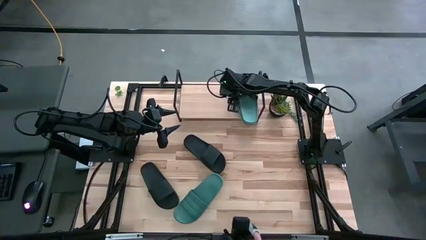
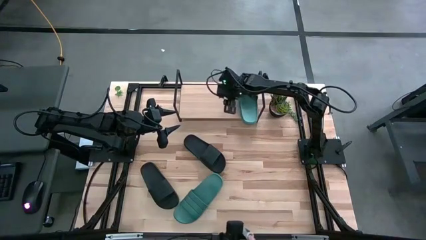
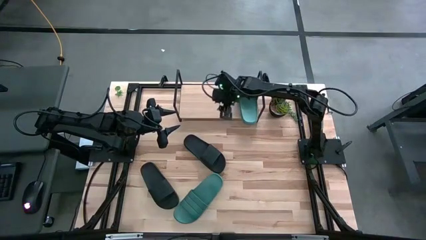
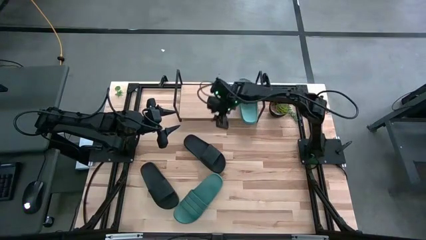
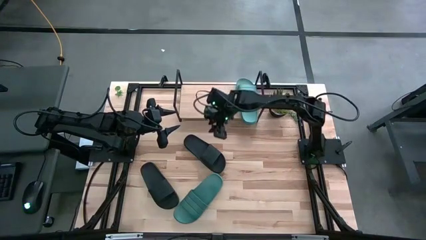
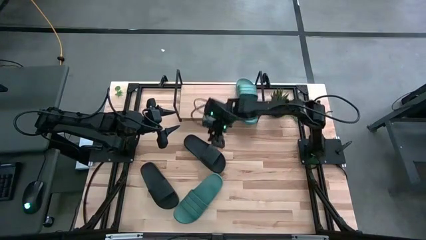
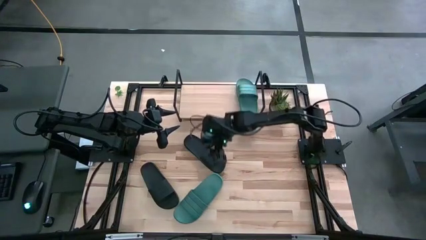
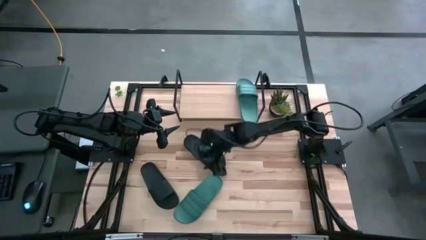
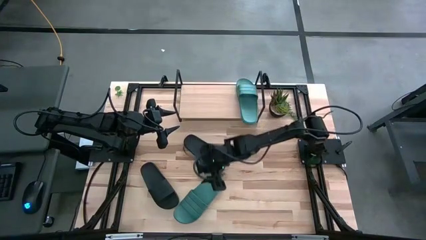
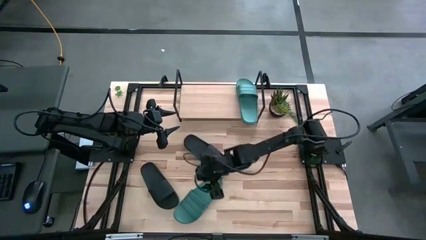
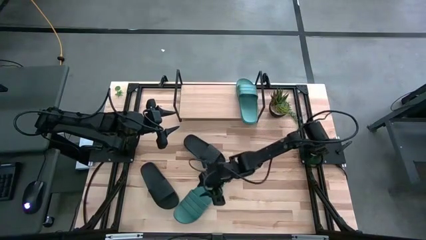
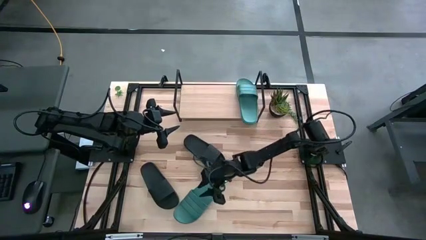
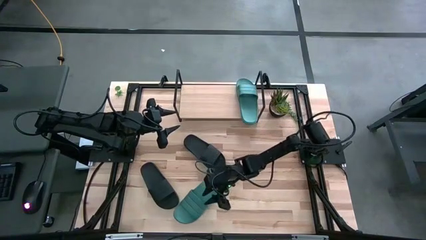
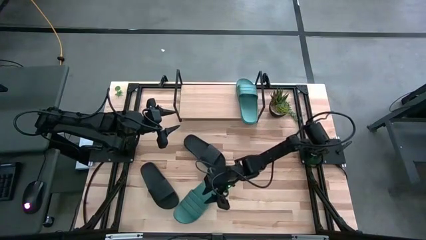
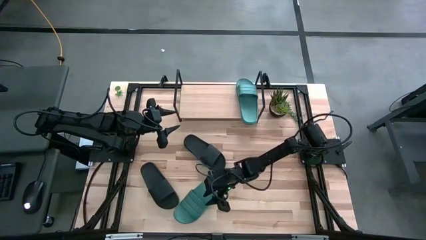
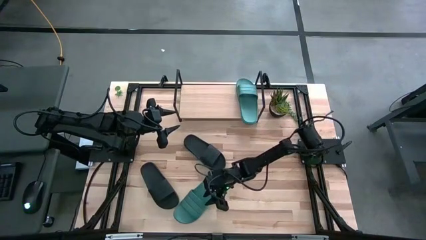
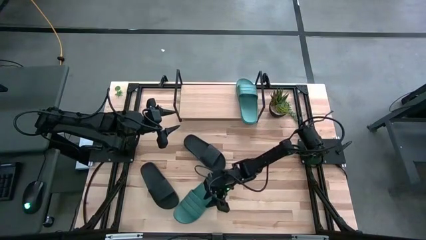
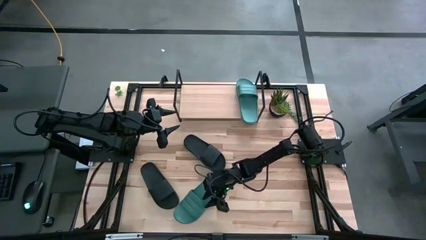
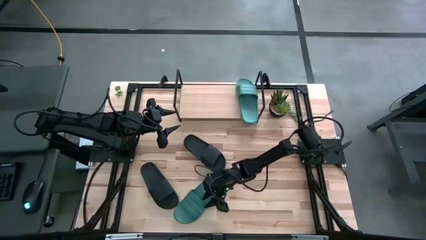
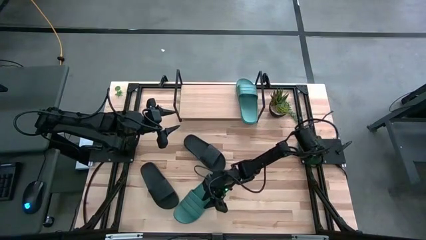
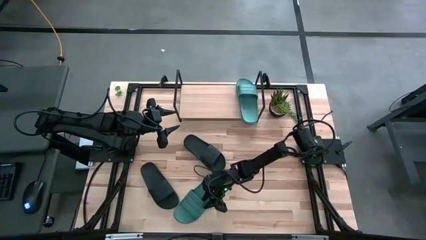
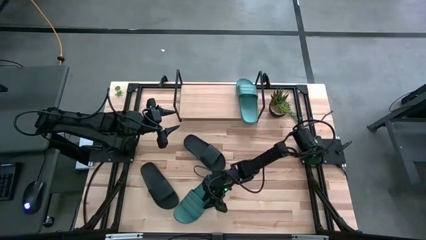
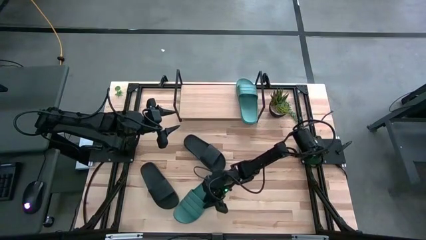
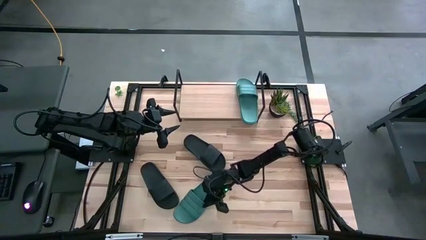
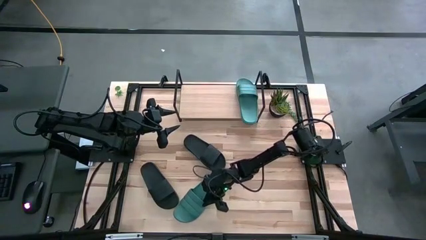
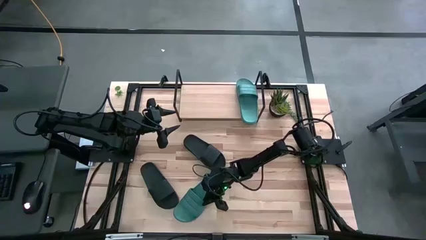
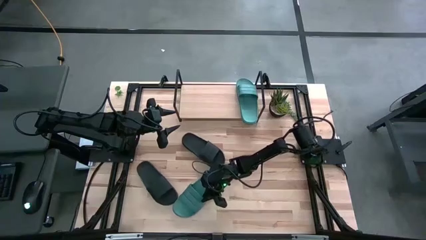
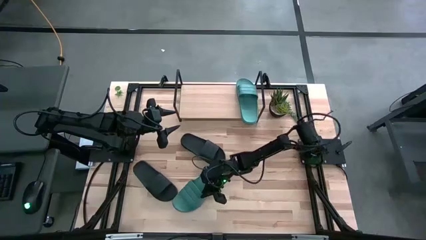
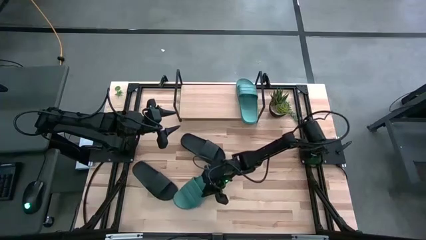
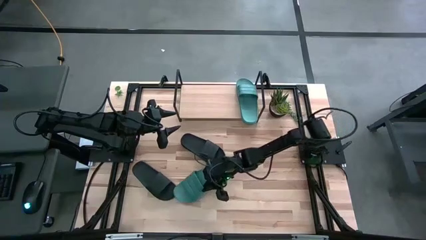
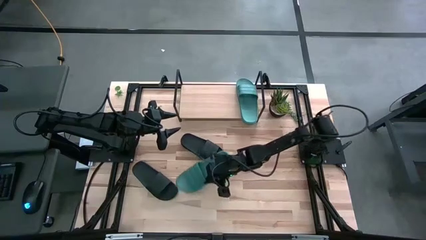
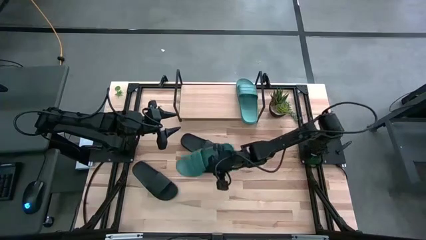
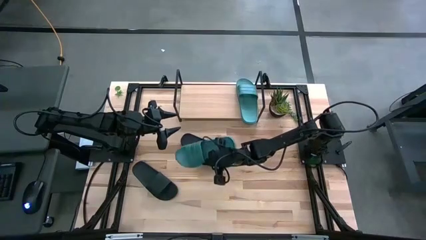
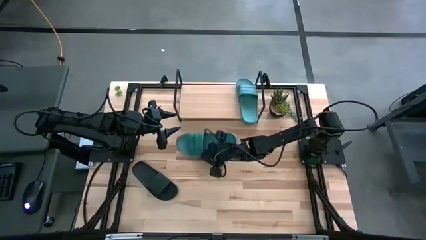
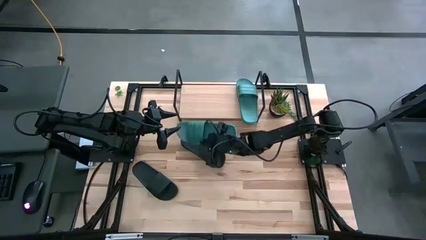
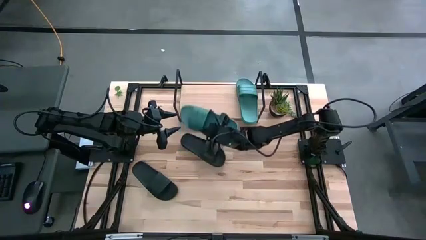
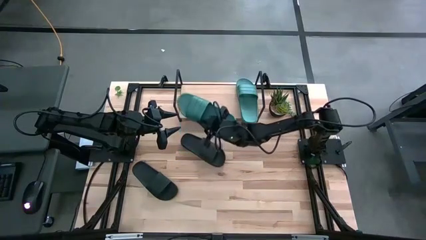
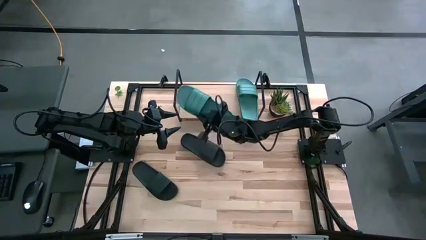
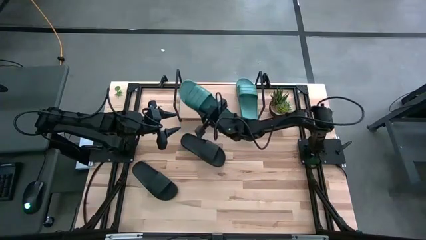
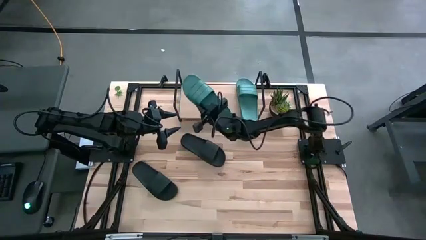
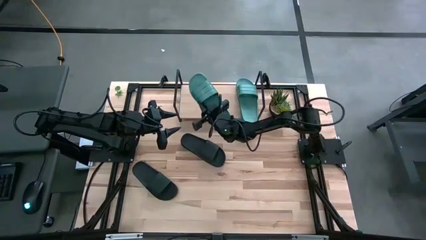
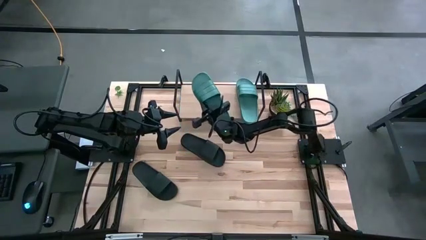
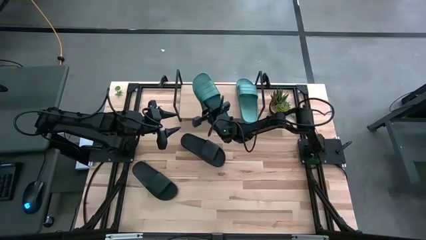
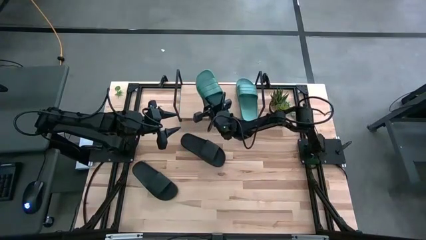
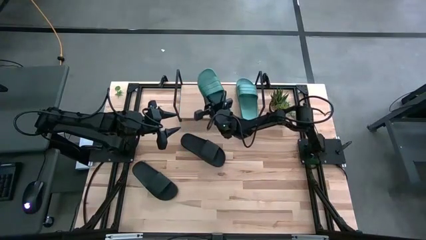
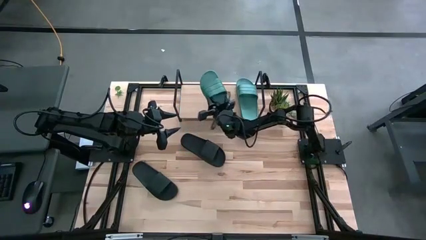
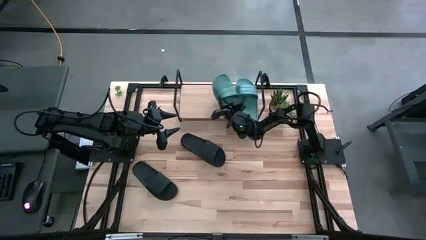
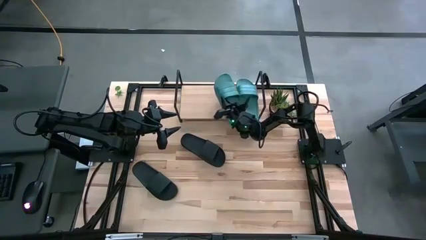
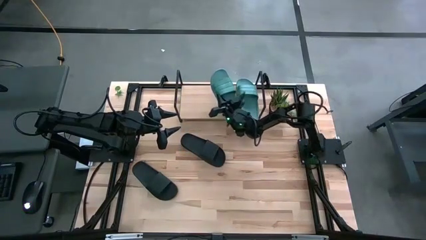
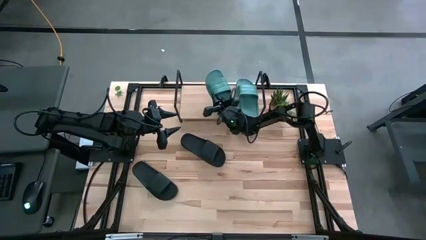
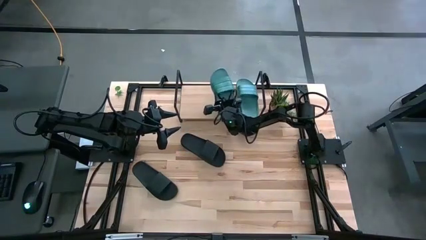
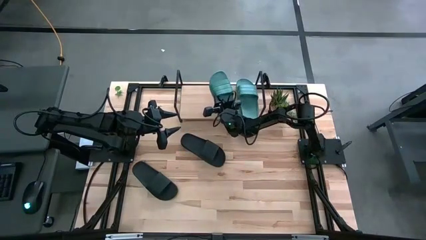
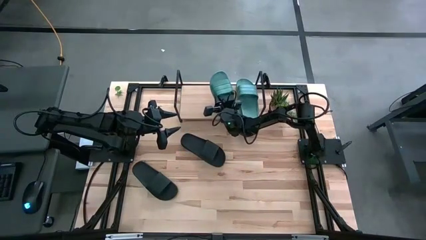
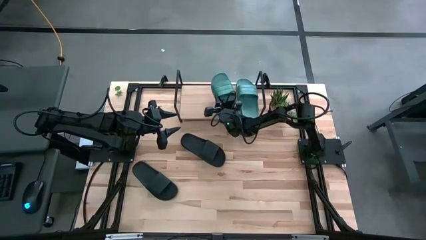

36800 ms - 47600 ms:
Task: Pick and place slides into the shelf
Put the blue slipper on the shelf
